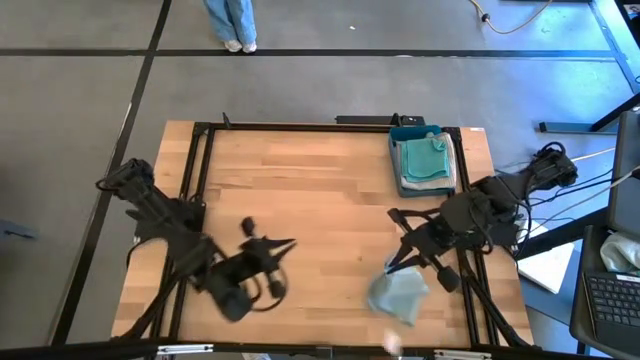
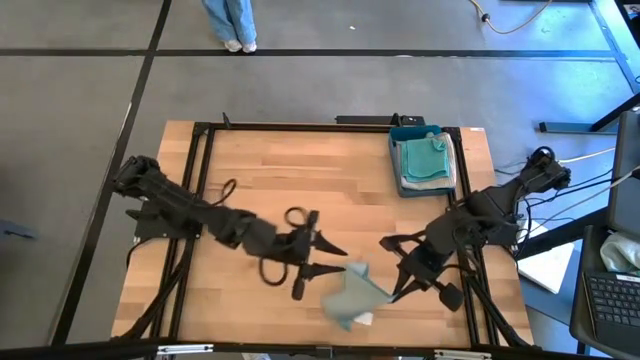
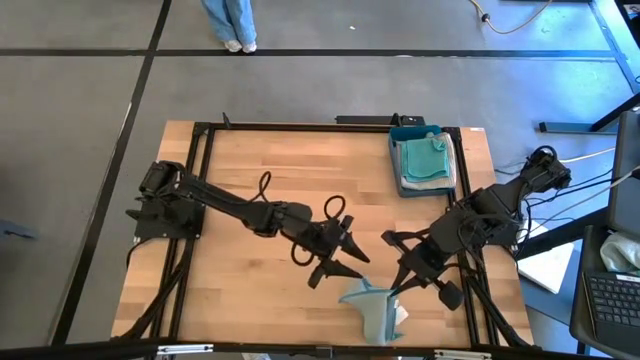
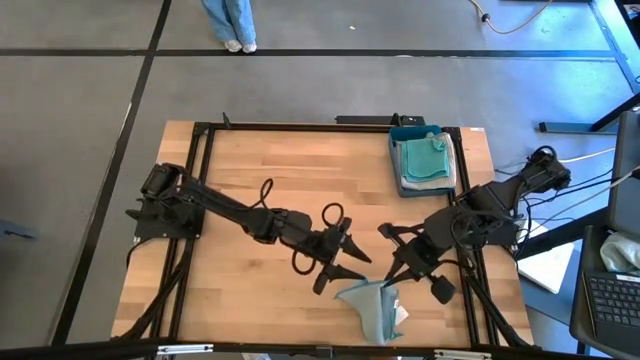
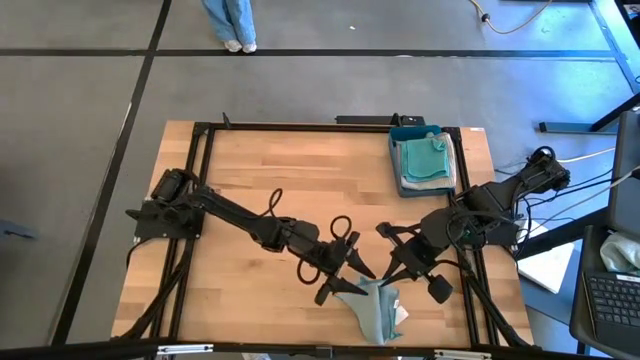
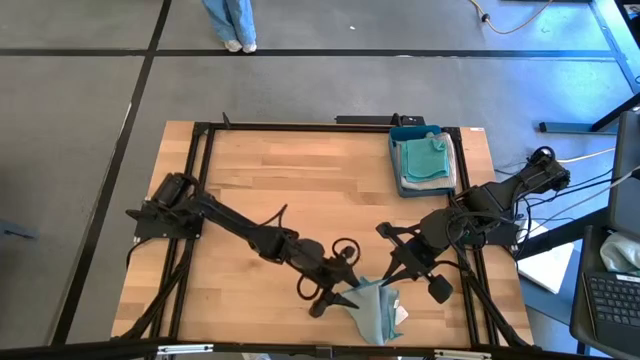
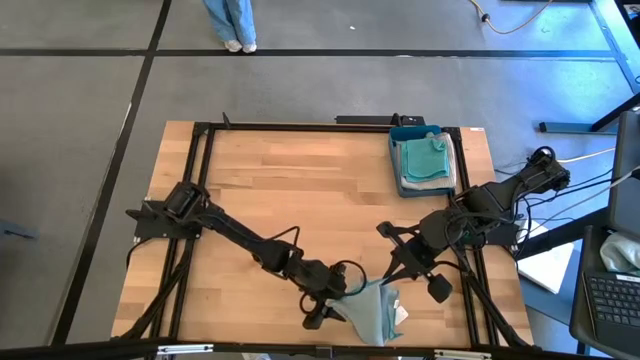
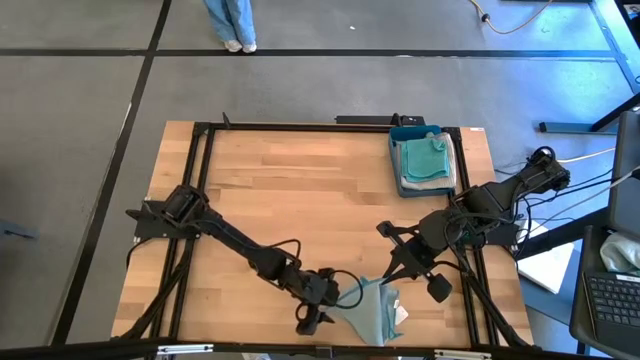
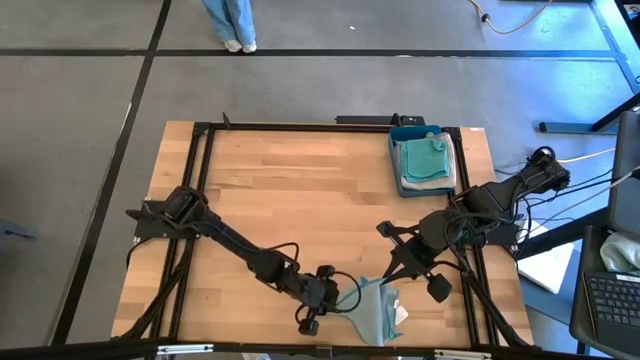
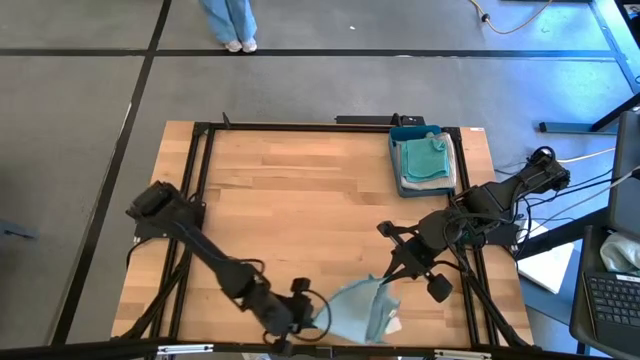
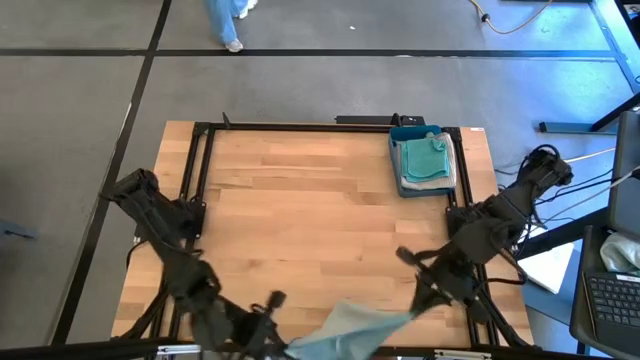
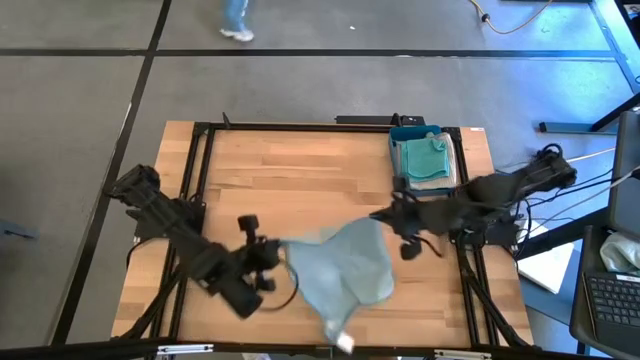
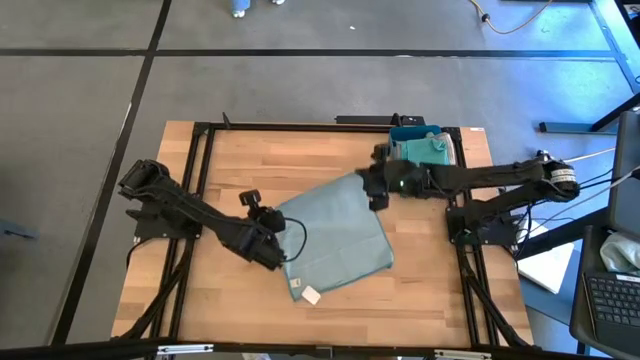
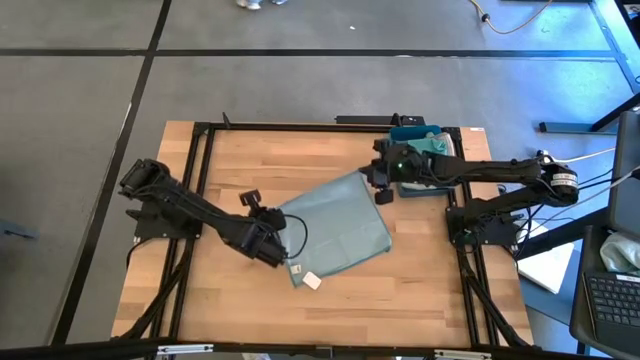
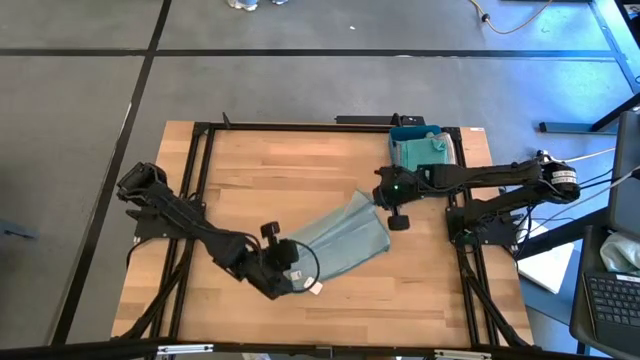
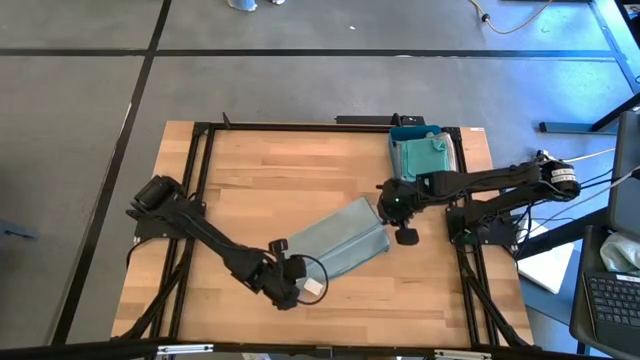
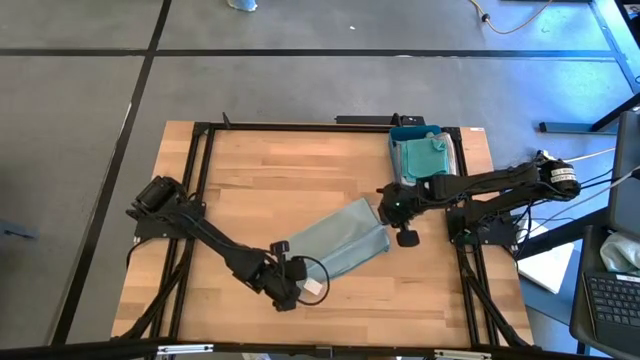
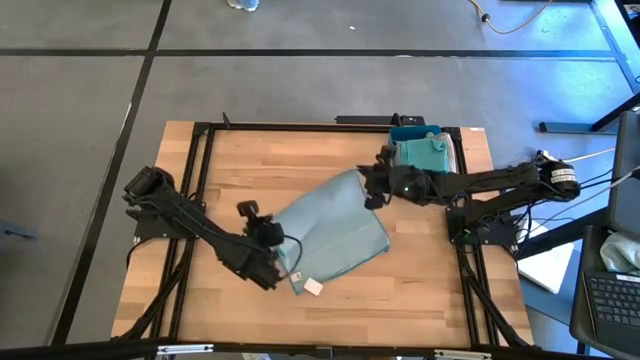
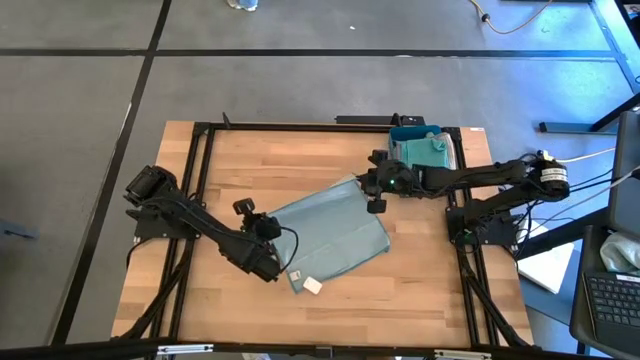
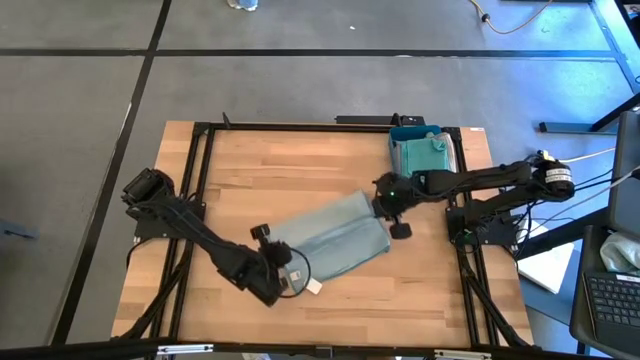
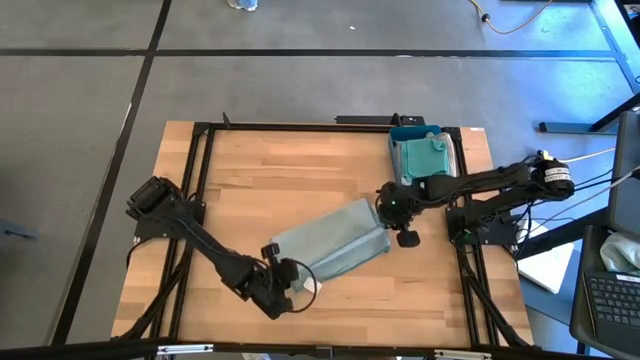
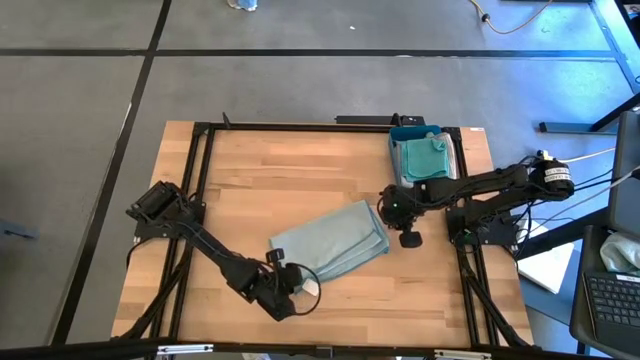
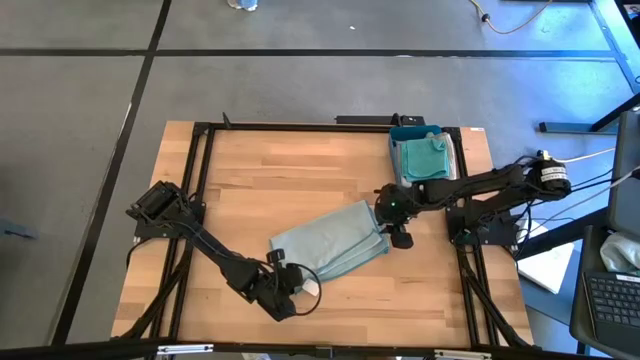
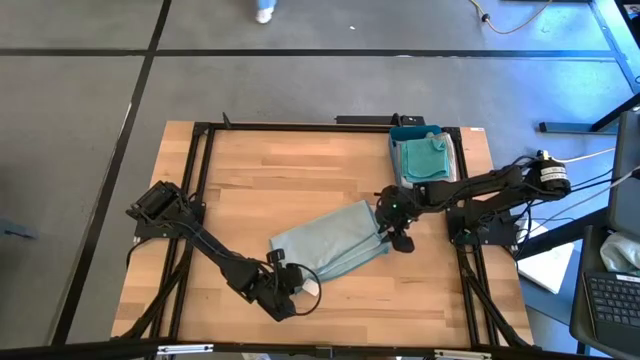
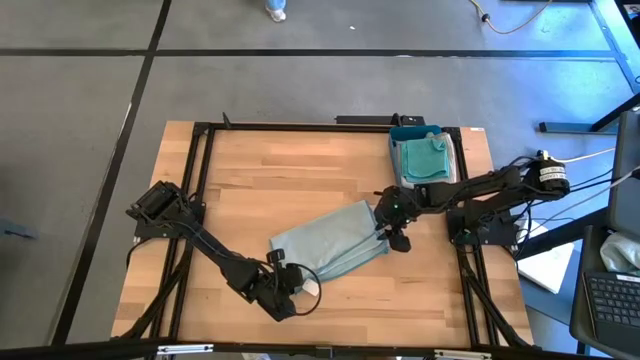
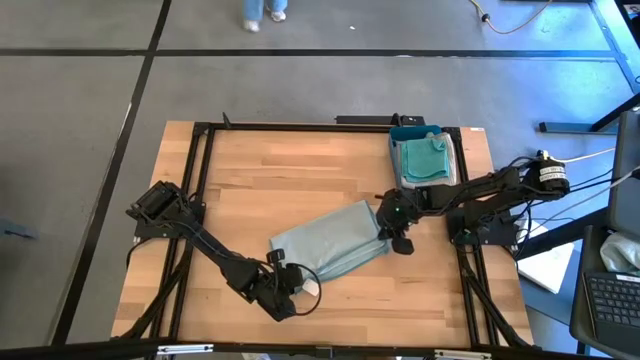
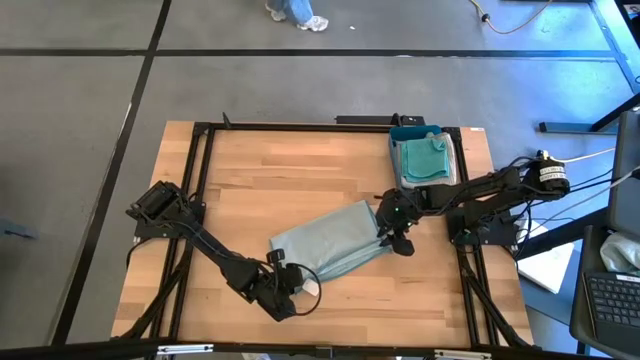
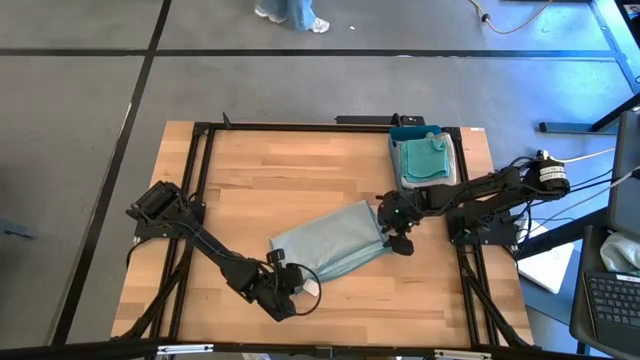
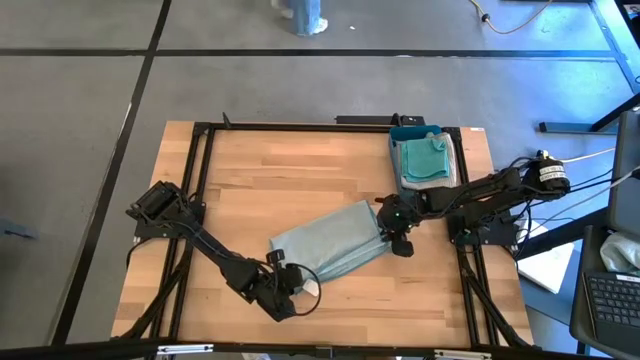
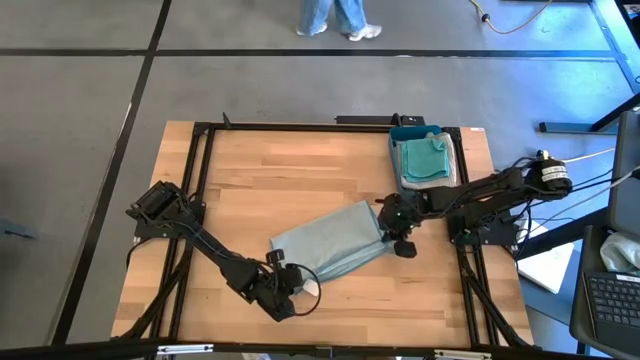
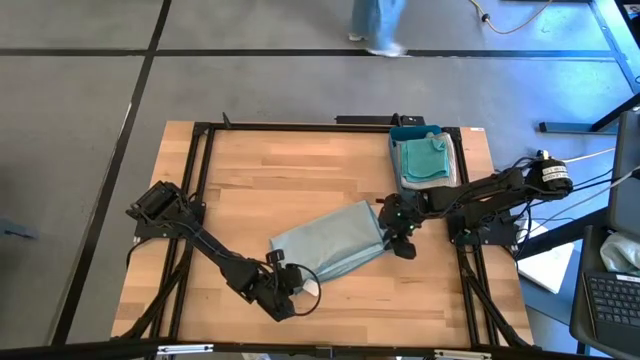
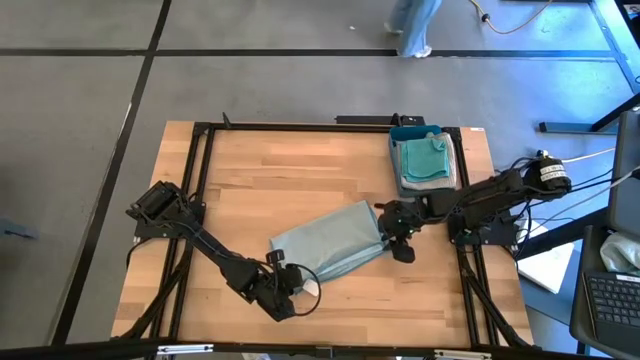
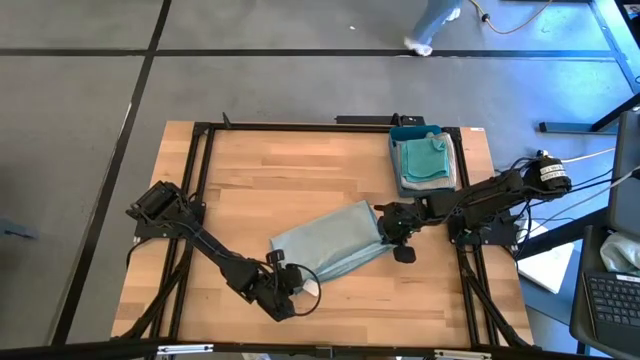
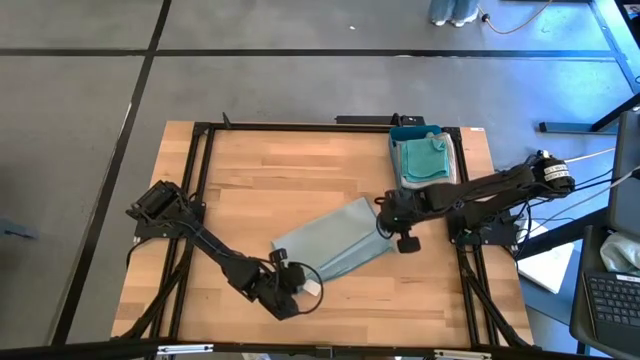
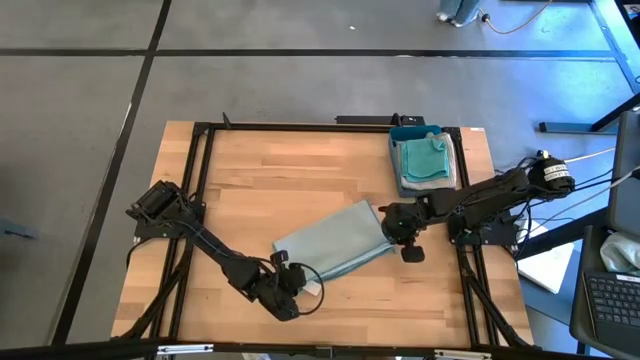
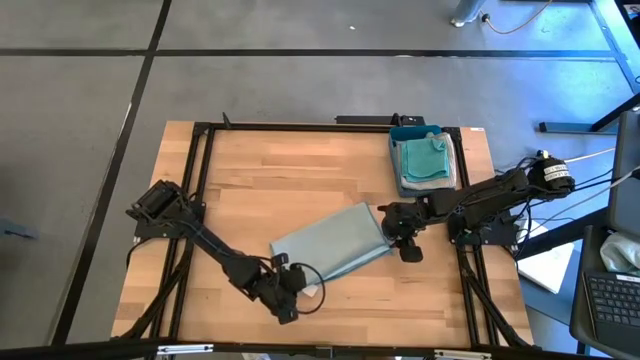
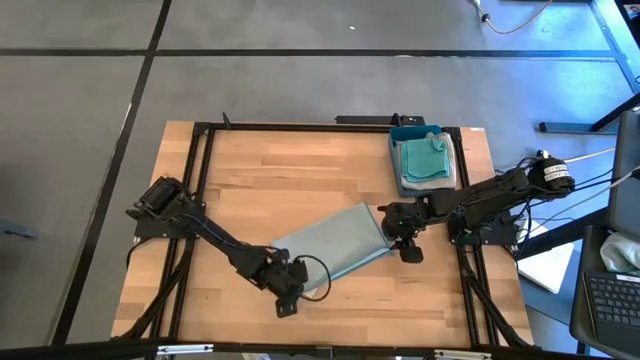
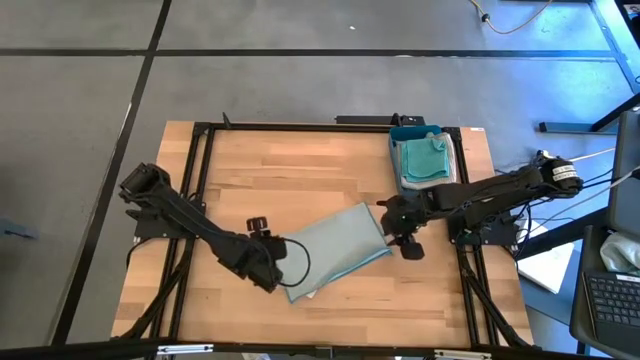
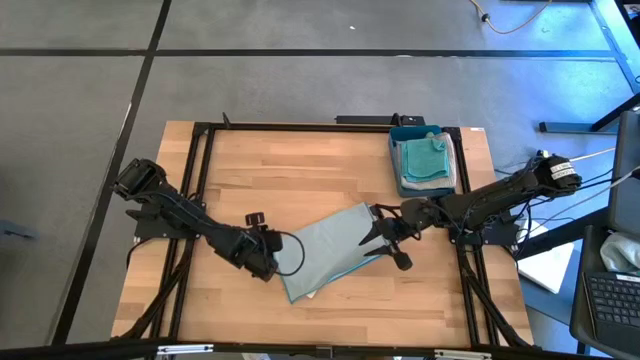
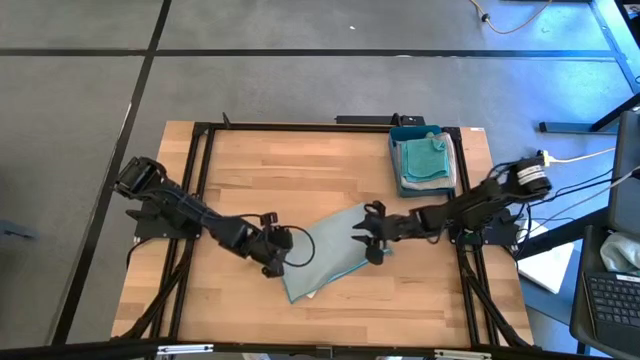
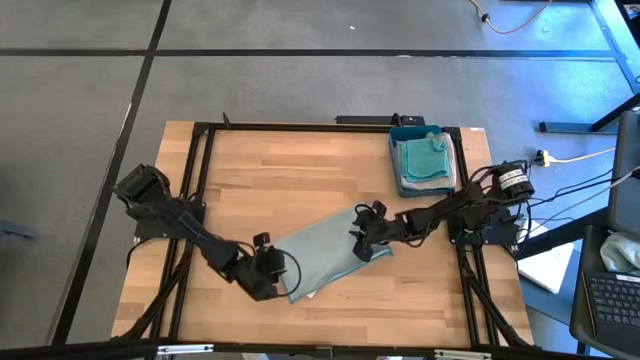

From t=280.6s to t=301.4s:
Task: Fold microfiber towels
Fold the light blue microfiber cloth

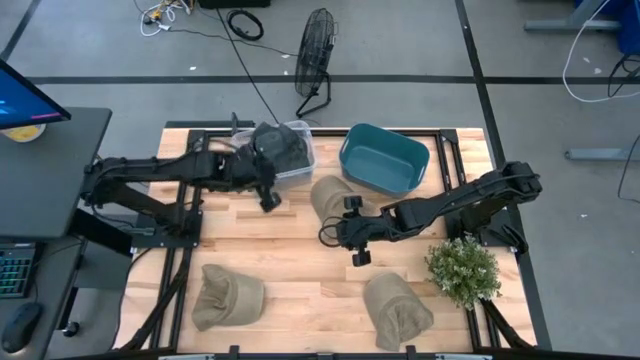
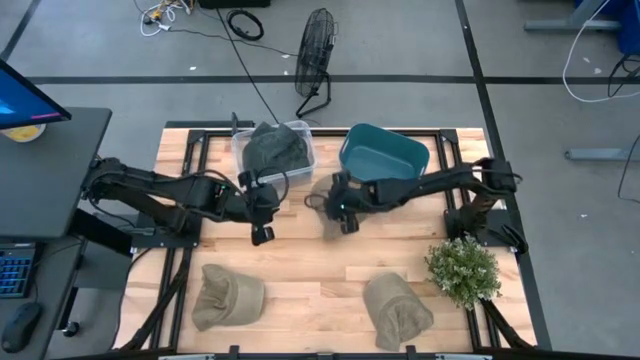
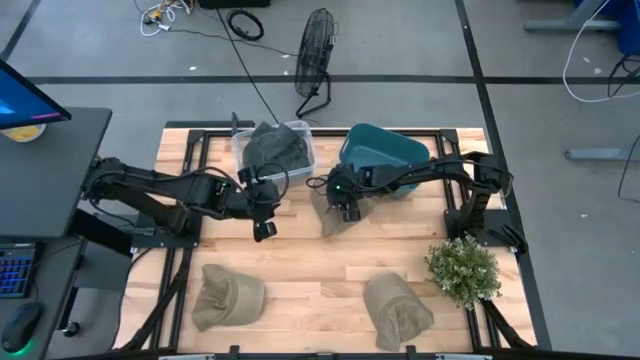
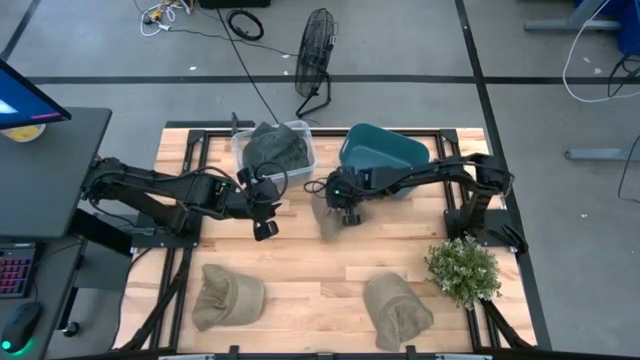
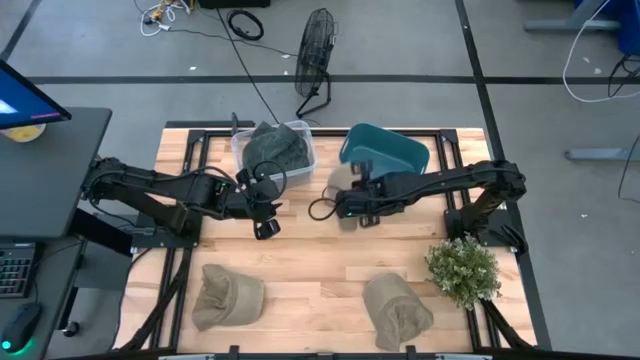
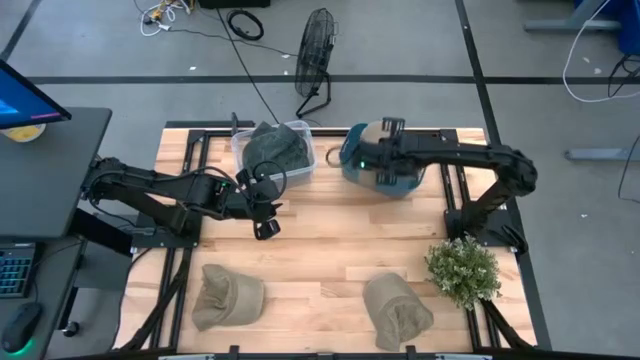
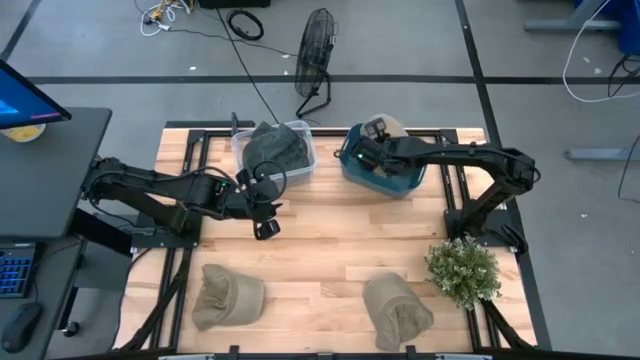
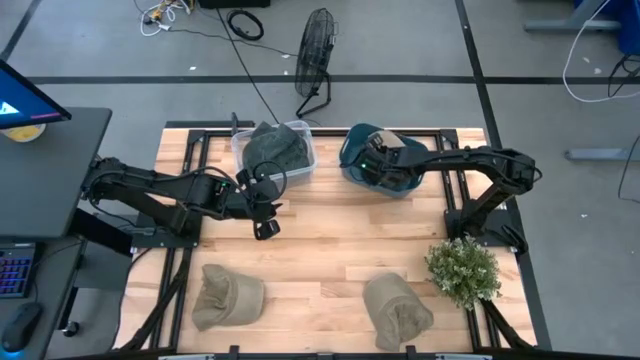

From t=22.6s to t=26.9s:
Task: Pick & Place hat
Put the top brown cap into the blue bin
